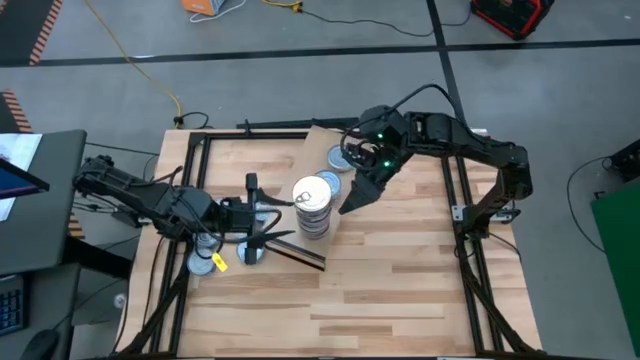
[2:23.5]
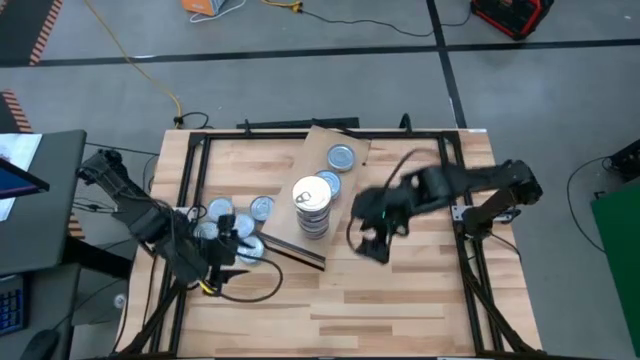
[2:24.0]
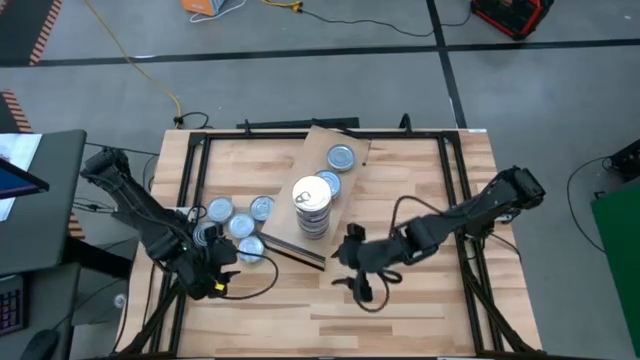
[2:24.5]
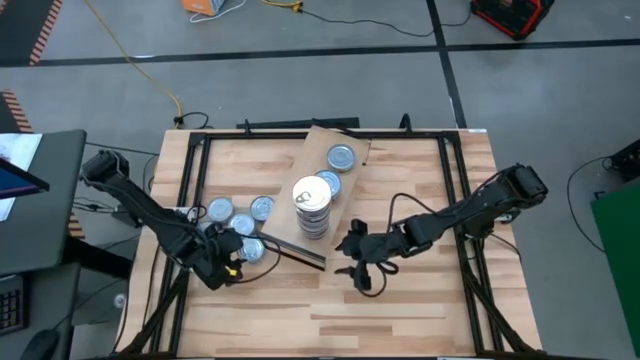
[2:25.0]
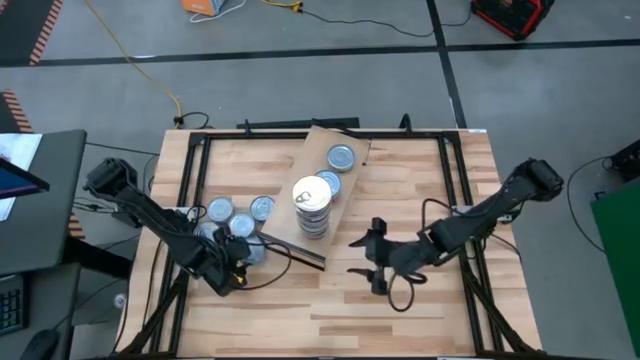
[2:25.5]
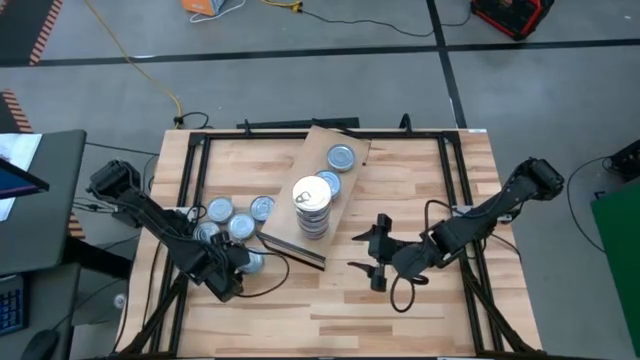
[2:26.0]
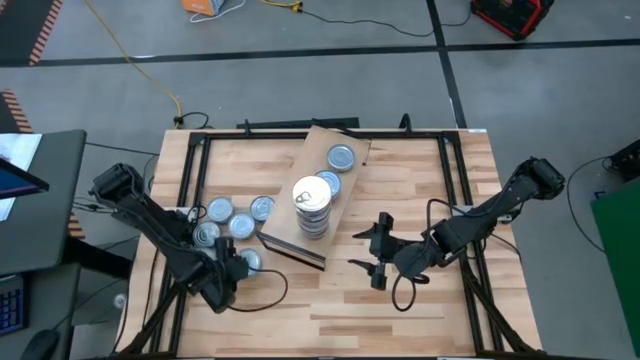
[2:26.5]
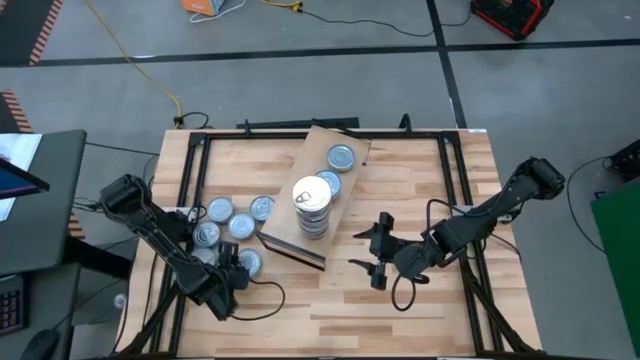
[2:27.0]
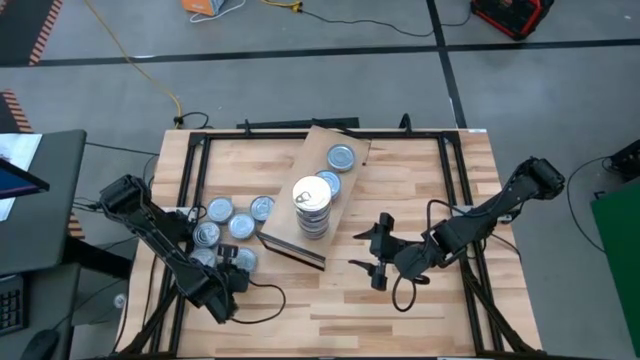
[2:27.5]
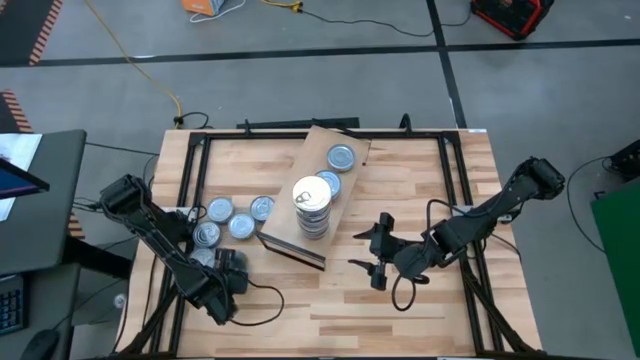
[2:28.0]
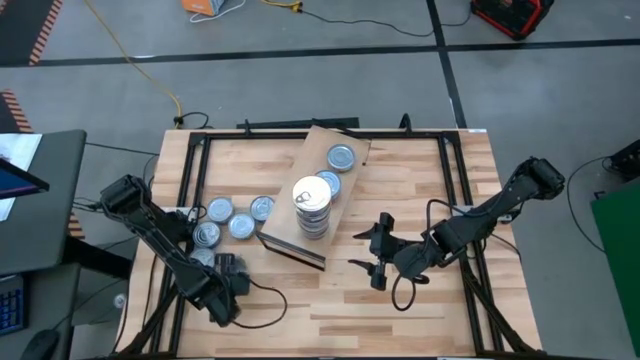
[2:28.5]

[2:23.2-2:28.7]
Task: Stack canned seafood by type on shelf
Stack the green tuna can on top of the yellow blue tuna can on the shelf

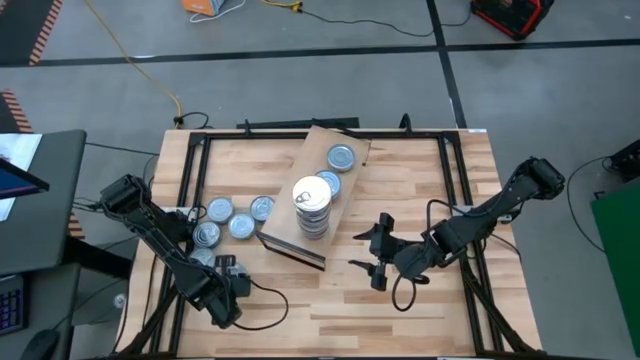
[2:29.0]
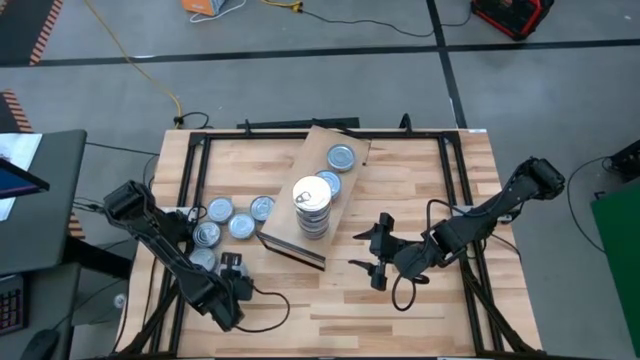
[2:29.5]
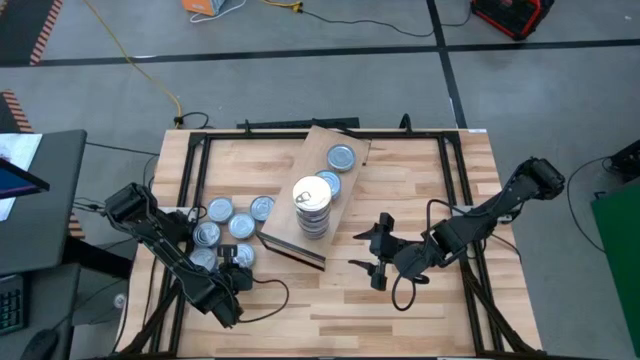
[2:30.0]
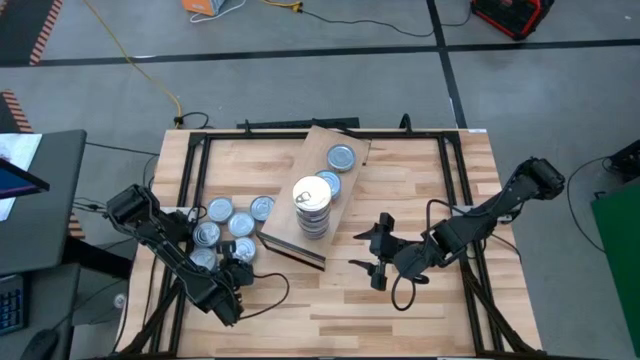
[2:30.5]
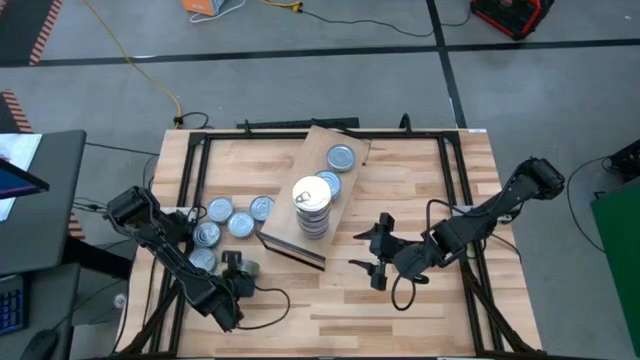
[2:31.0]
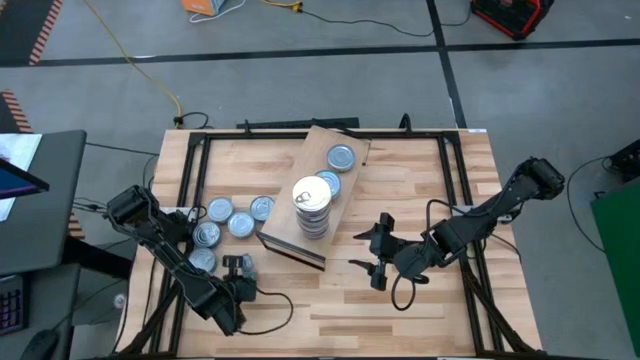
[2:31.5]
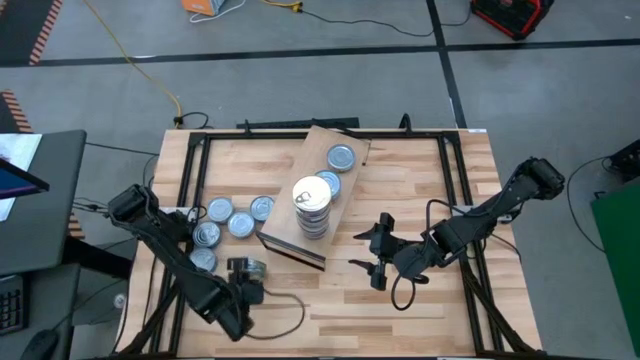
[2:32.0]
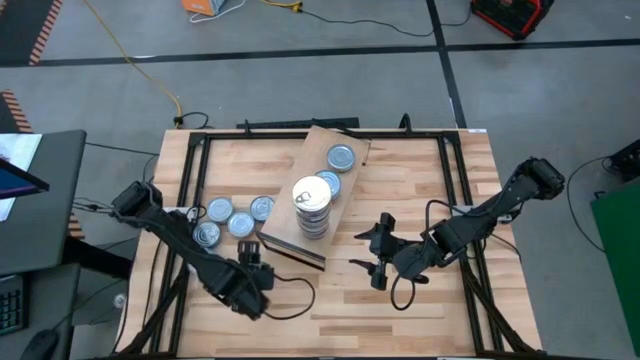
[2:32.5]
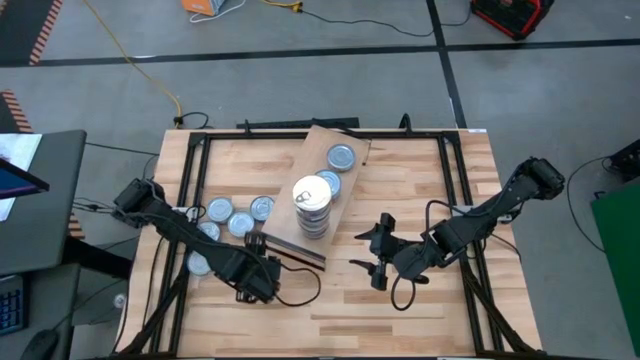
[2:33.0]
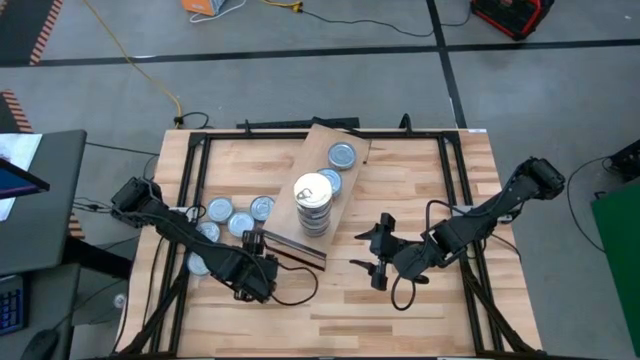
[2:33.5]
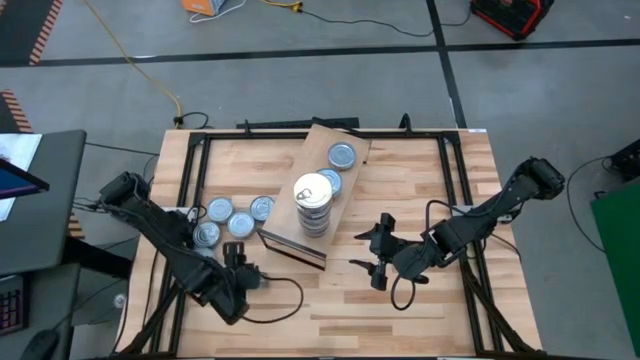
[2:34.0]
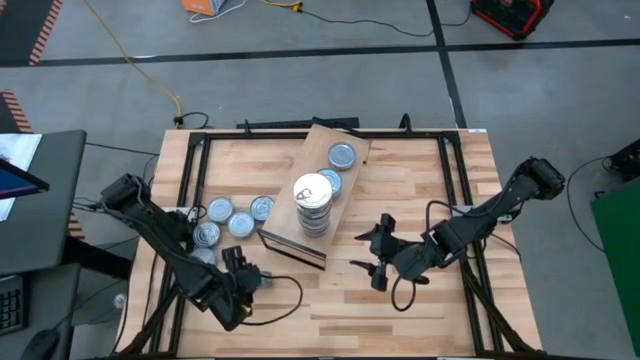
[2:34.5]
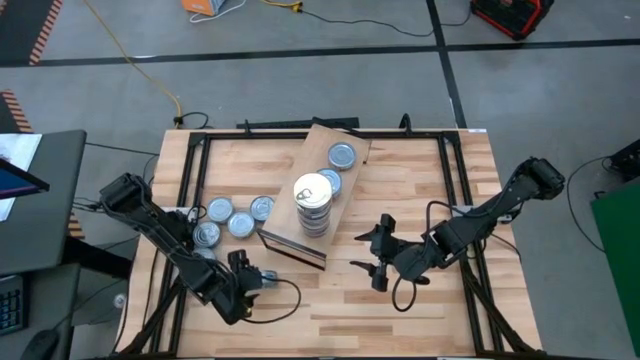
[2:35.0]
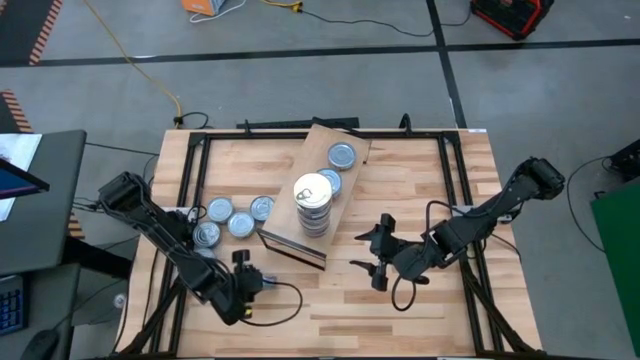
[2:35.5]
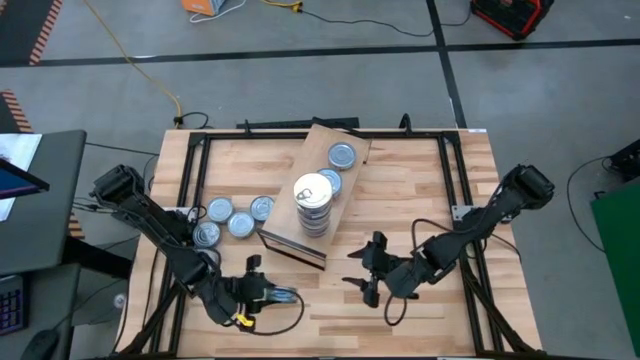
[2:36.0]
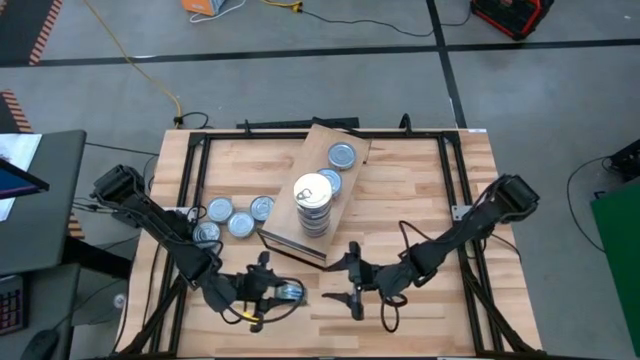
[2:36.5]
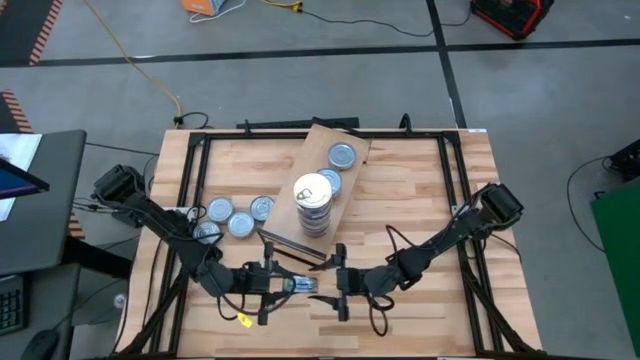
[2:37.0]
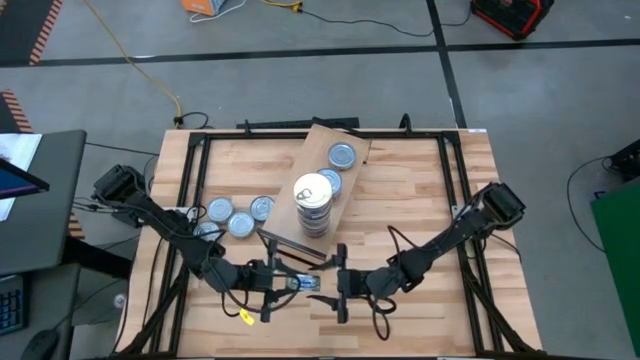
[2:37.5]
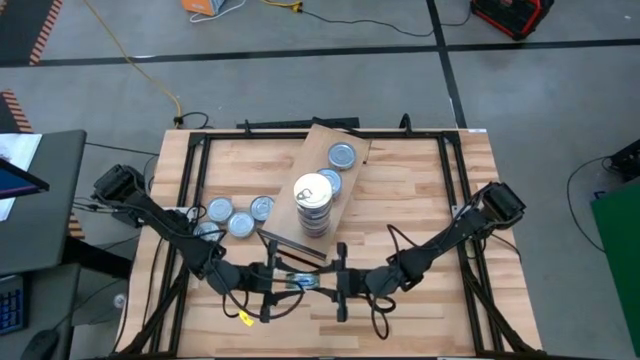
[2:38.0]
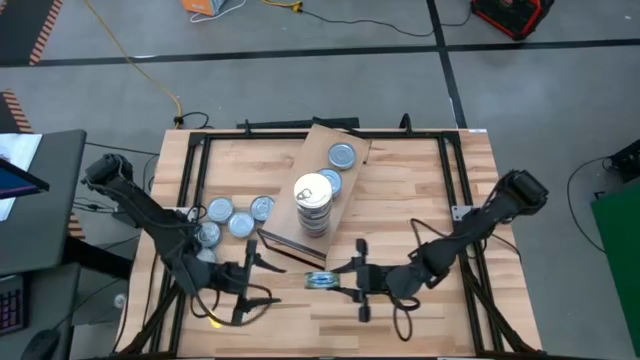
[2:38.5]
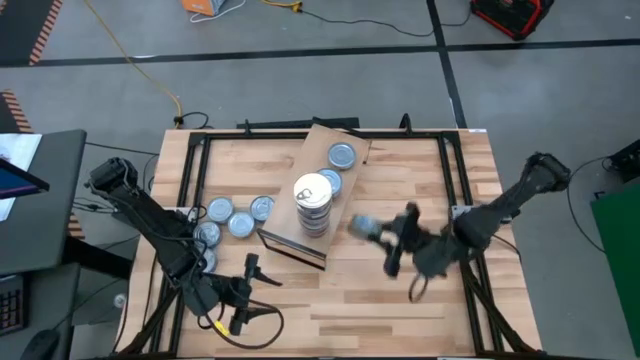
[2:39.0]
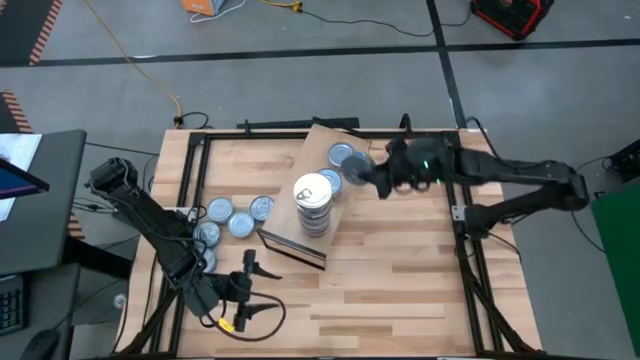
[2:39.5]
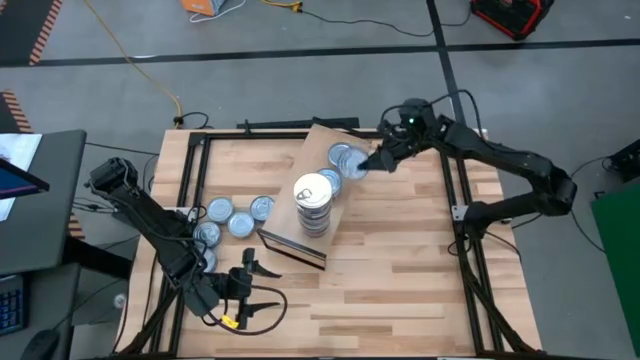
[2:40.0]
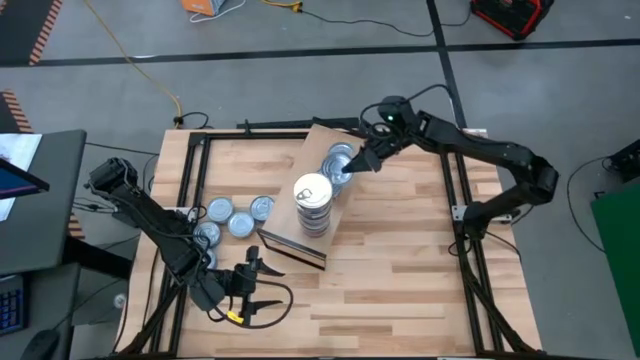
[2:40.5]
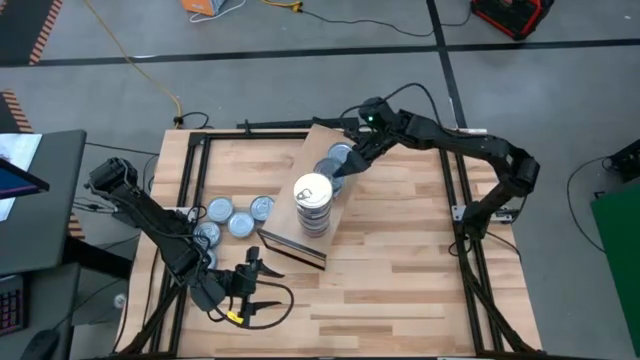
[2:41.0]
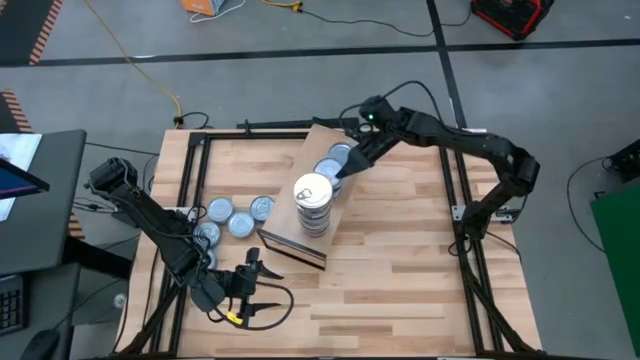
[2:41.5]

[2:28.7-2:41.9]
Stack the green tuna can on top of the yellow blue tuna can on the shelf

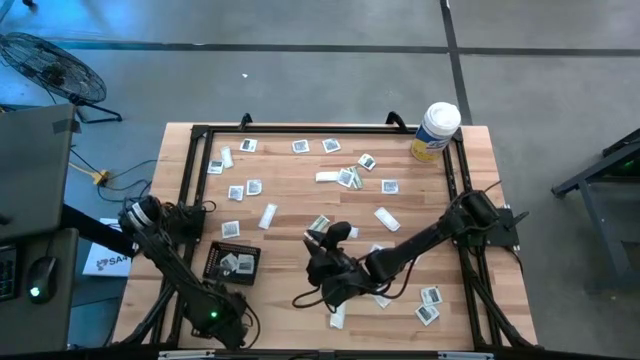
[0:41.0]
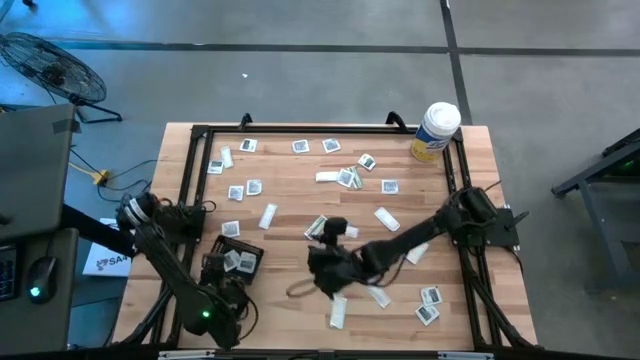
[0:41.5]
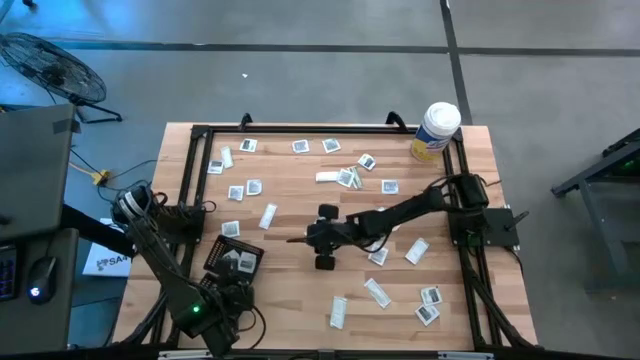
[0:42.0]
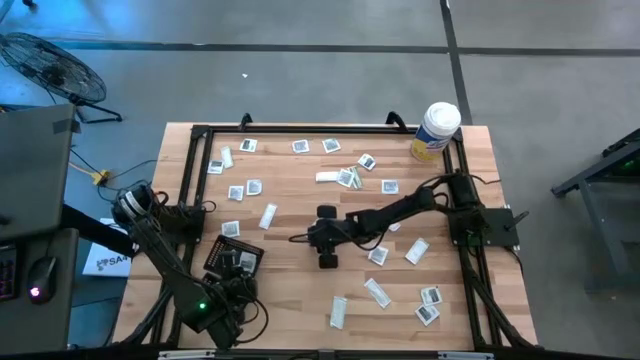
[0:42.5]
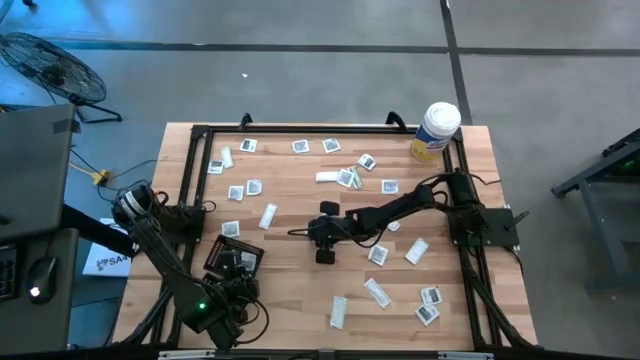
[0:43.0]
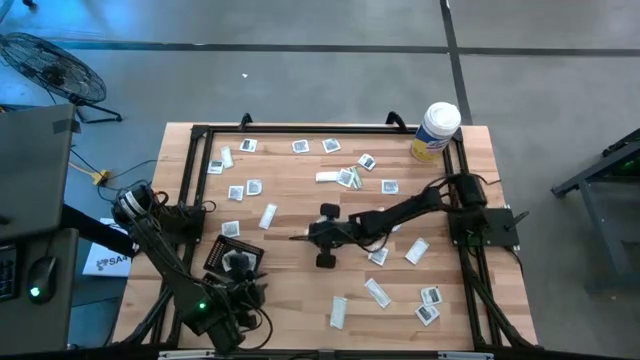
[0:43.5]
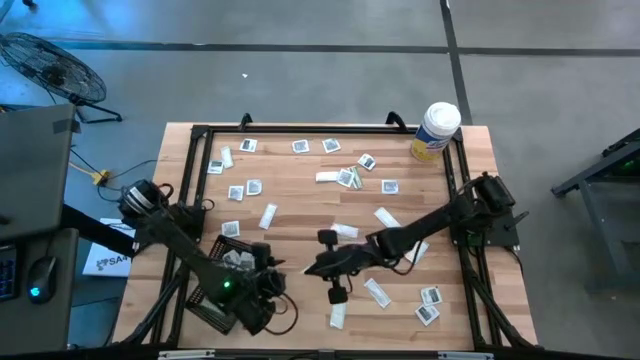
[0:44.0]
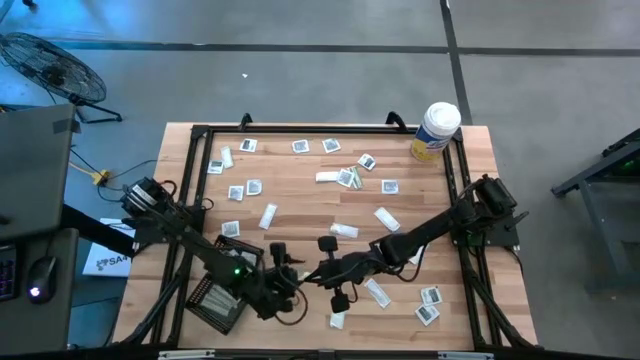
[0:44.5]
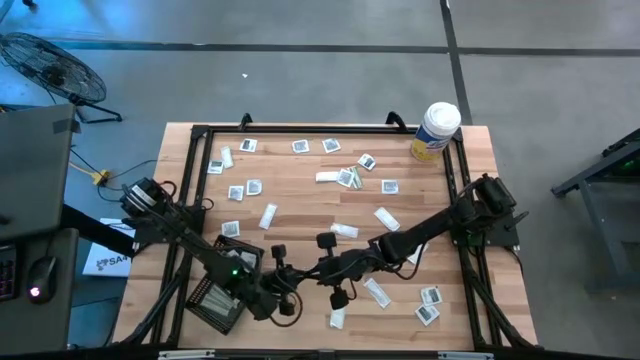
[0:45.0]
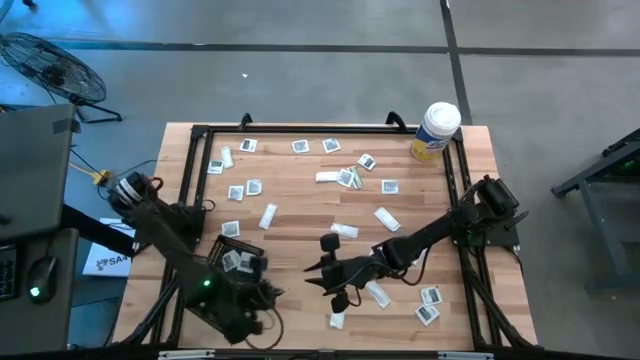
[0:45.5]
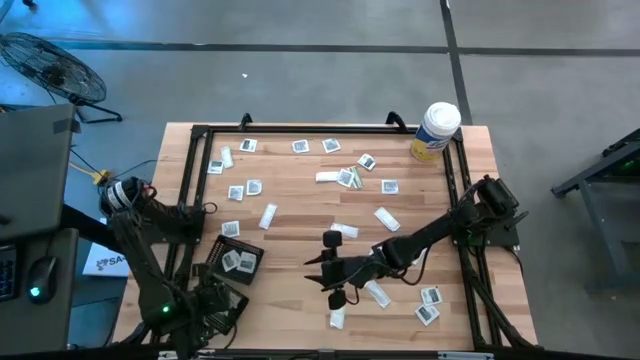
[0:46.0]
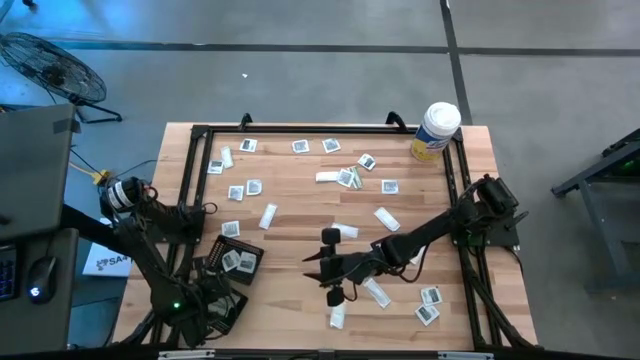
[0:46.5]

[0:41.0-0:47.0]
Task: Pick & Place First Aid Supplies
Put the bandage into the bottom black bin
